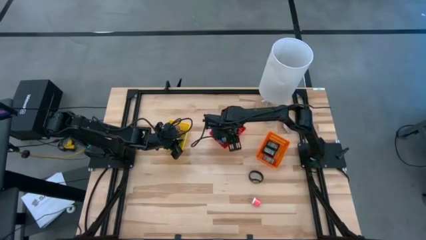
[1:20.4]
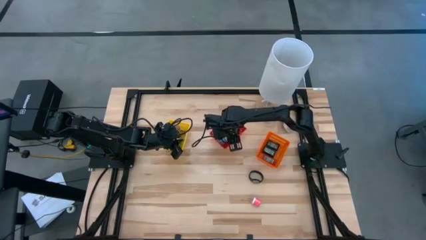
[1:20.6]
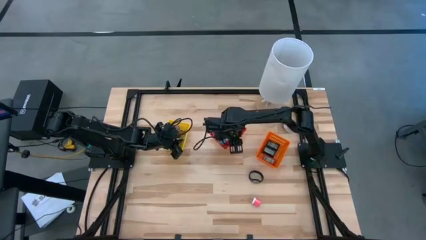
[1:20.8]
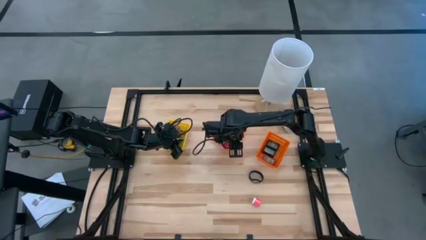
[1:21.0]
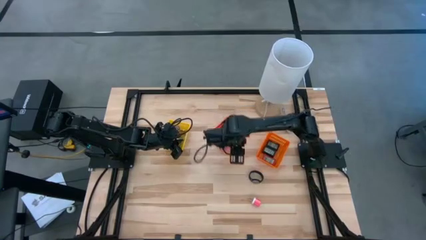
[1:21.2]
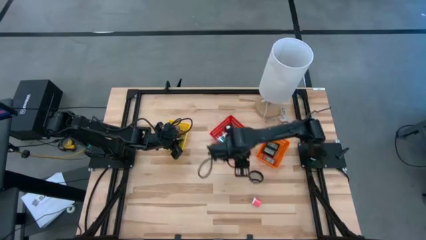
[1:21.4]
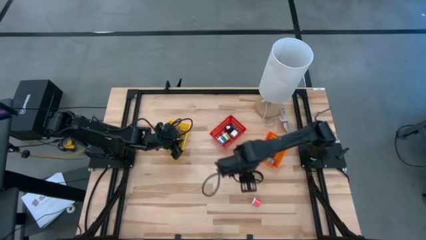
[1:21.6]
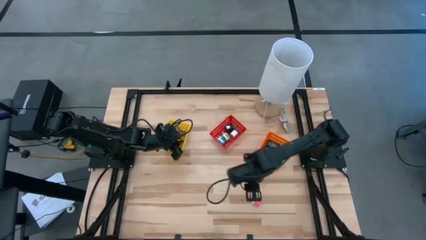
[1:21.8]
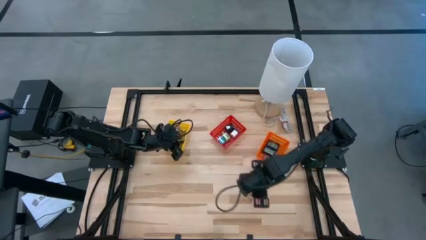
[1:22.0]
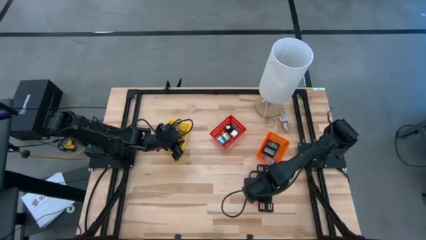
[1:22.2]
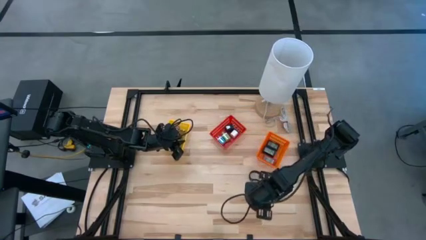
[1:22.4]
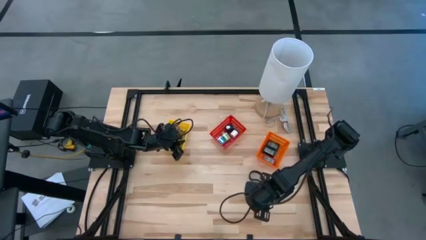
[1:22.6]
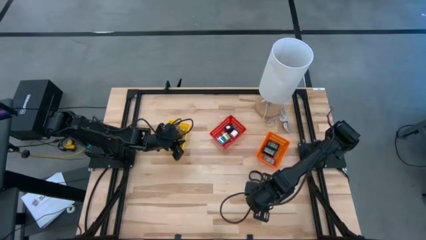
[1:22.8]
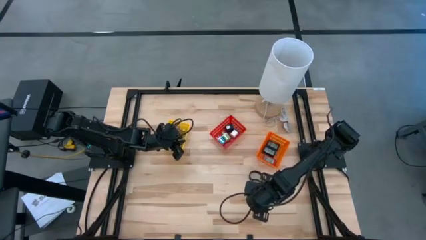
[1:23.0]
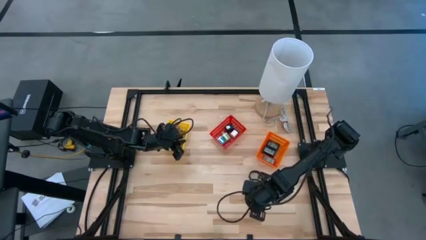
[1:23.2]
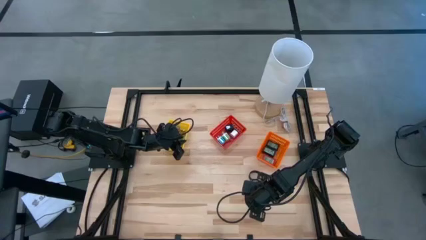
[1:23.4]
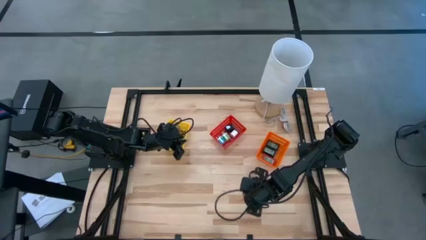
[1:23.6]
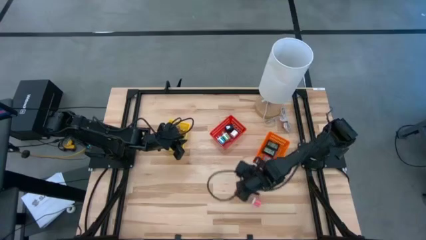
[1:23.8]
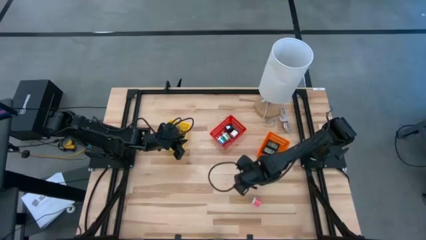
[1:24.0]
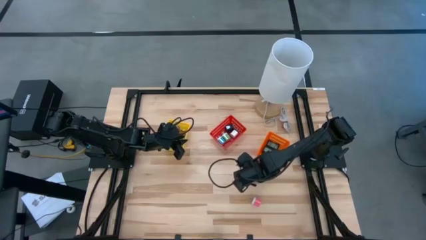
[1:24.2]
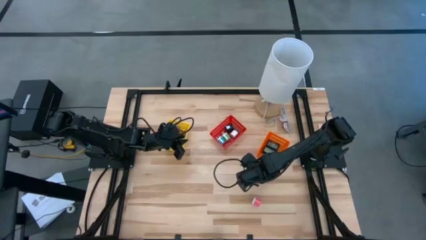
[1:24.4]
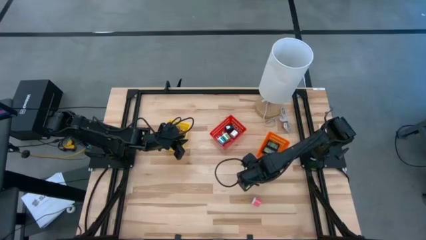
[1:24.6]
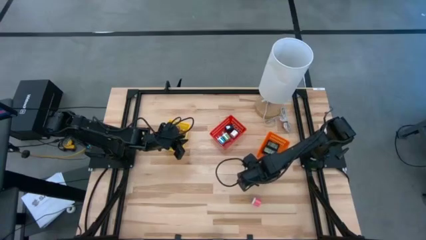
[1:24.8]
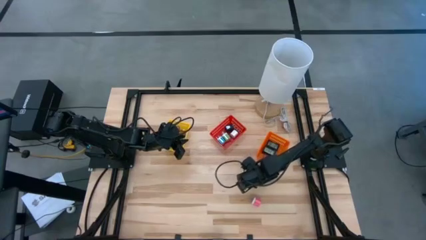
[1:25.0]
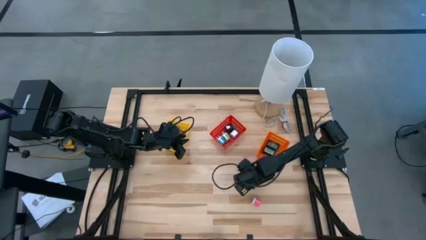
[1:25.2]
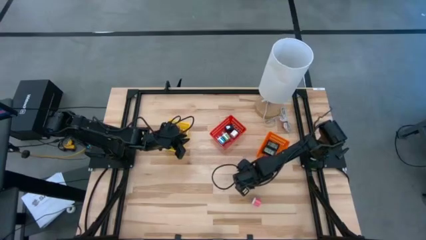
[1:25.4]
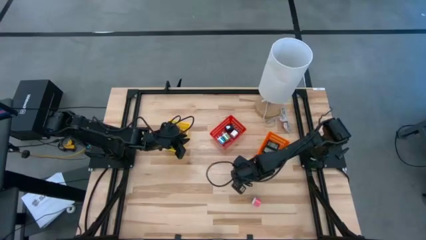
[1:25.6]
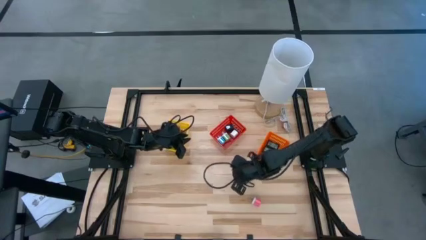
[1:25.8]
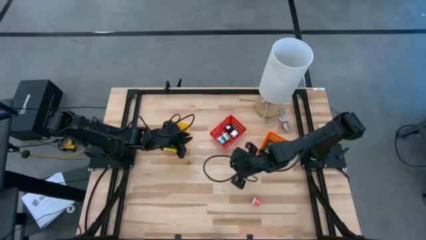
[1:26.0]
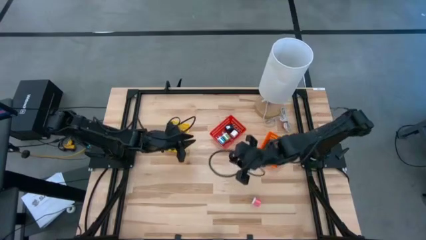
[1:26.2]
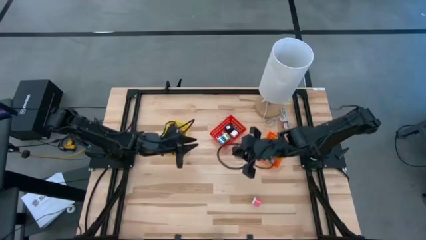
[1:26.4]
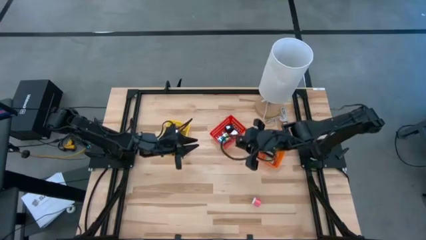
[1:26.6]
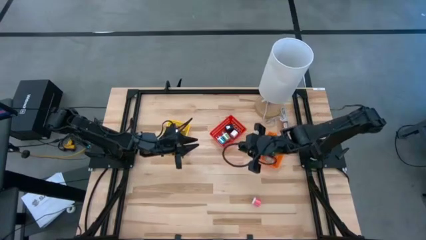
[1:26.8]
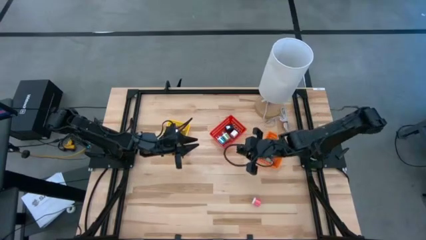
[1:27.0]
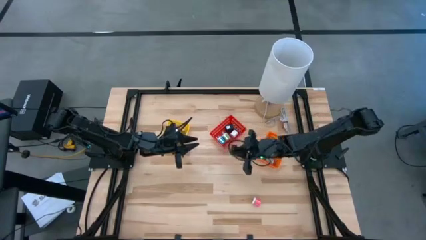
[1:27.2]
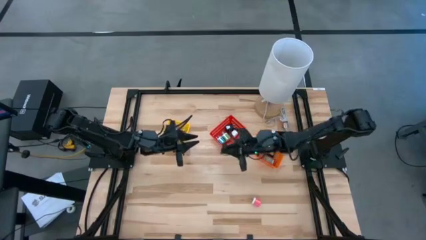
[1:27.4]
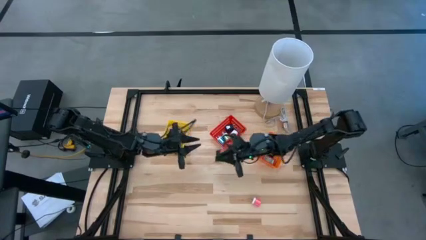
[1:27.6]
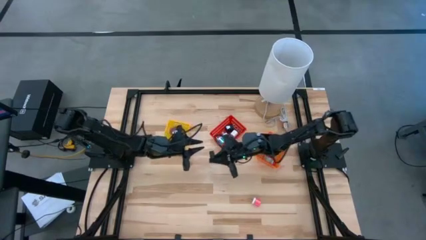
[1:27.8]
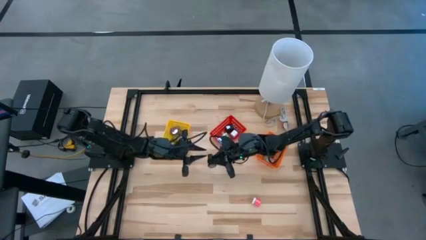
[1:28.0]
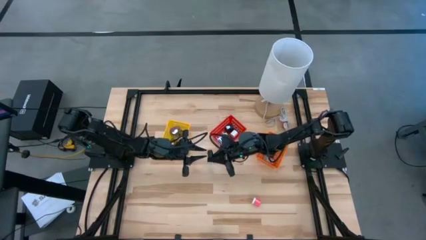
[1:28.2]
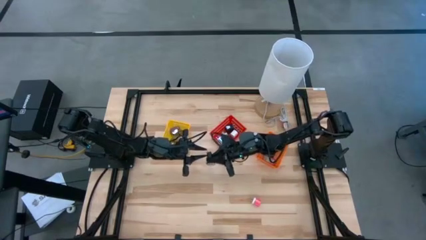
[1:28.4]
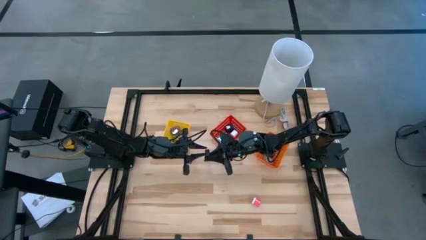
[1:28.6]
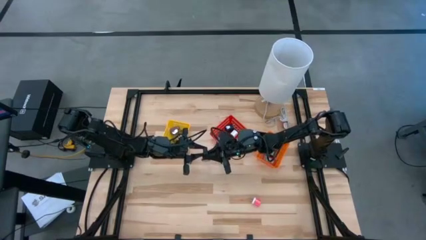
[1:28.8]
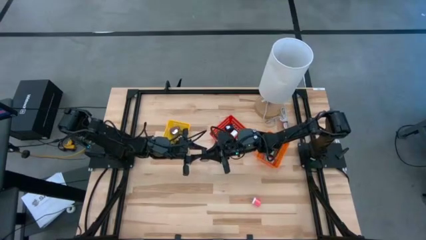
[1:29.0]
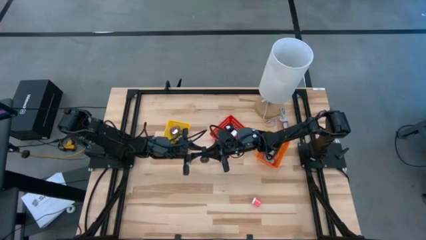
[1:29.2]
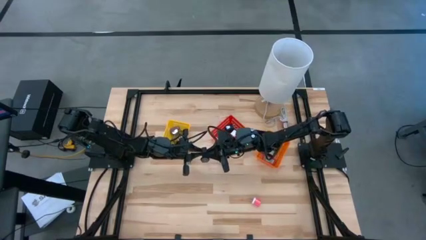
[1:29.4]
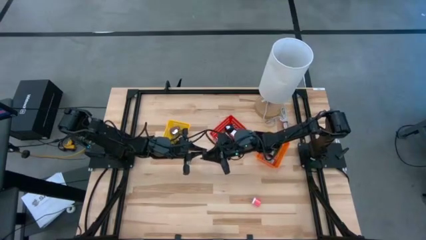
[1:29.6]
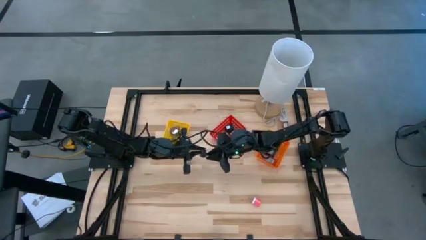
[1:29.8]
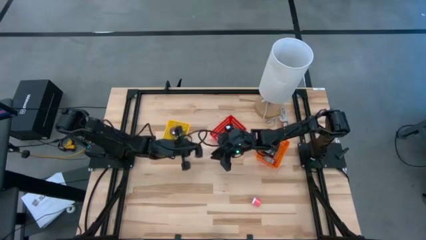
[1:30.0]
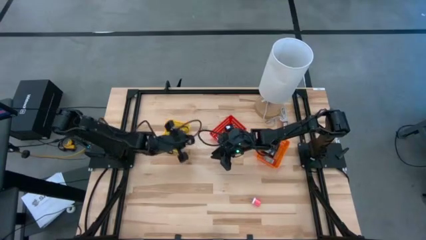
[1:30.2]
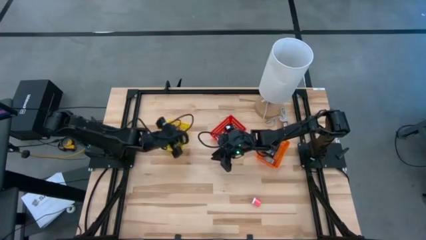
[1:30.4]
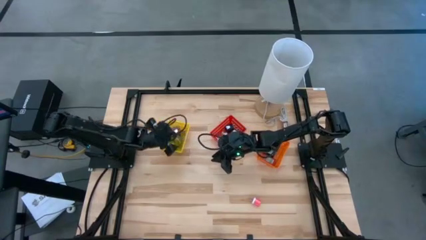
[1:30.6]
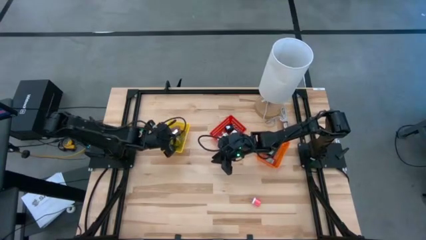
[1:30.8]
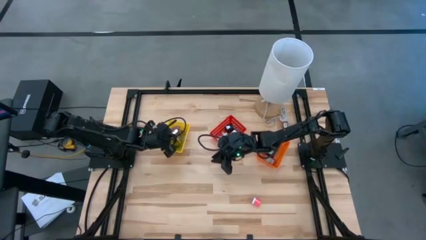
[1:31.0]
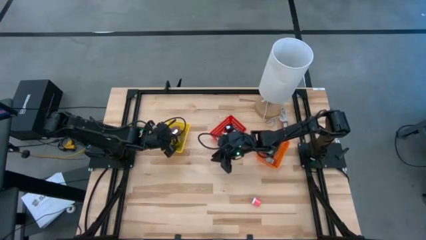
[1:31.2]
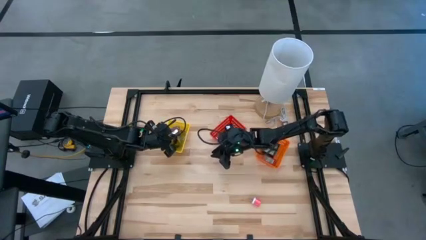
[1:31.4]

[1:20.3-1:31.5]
Task: Pick & Place Office items
Put the black watch into the yellow bin

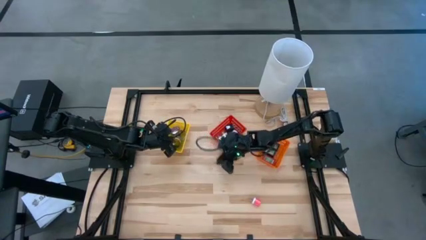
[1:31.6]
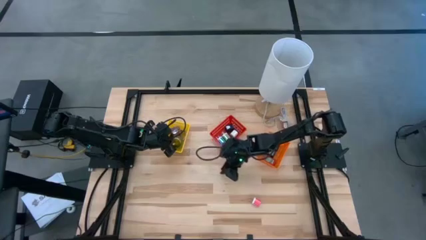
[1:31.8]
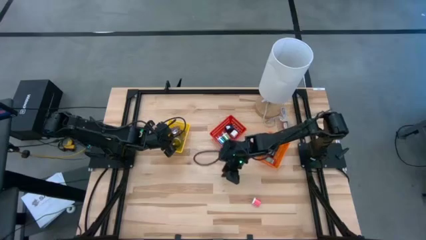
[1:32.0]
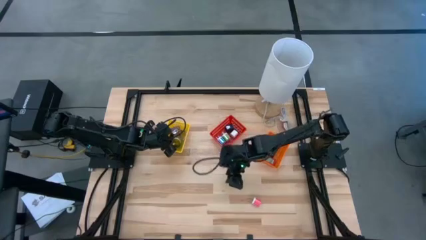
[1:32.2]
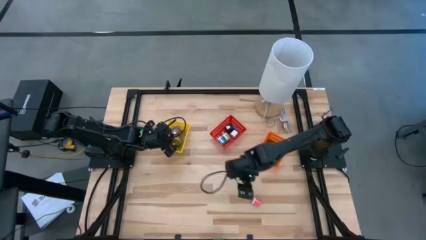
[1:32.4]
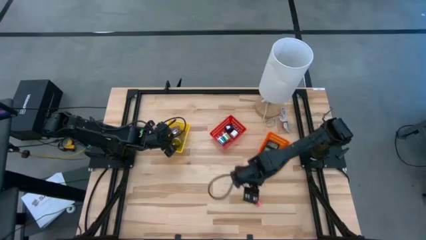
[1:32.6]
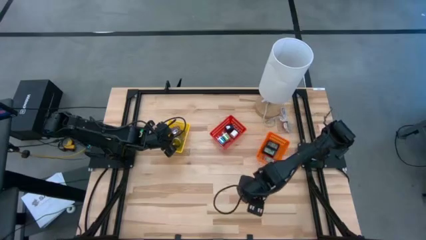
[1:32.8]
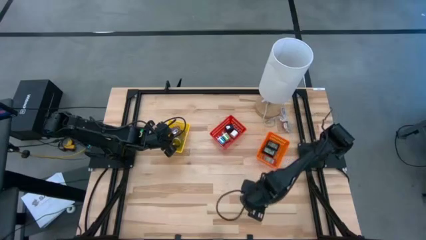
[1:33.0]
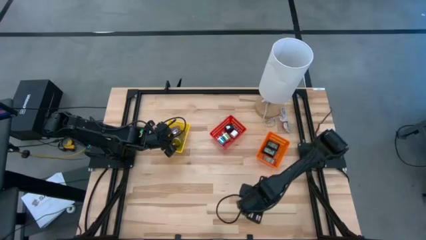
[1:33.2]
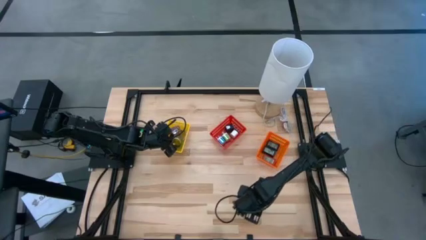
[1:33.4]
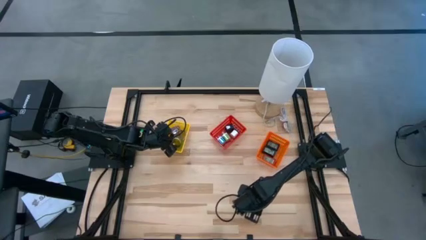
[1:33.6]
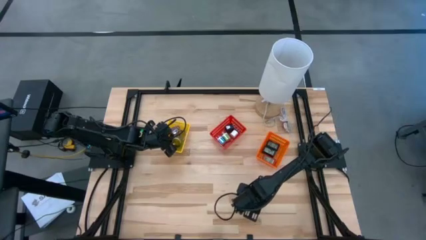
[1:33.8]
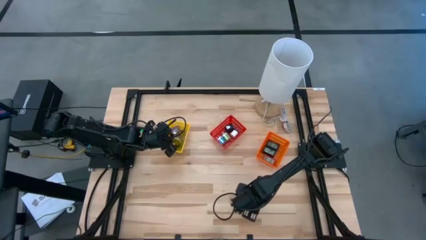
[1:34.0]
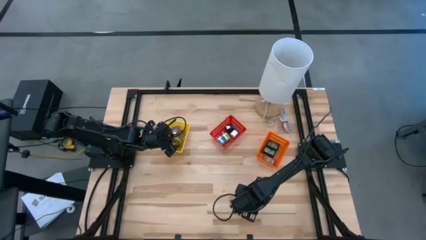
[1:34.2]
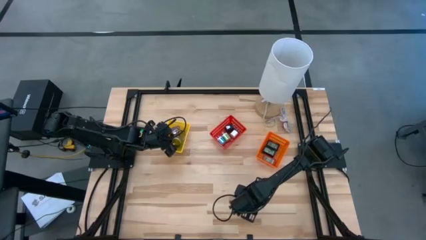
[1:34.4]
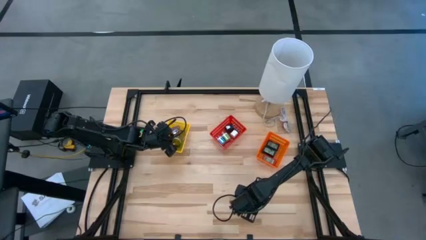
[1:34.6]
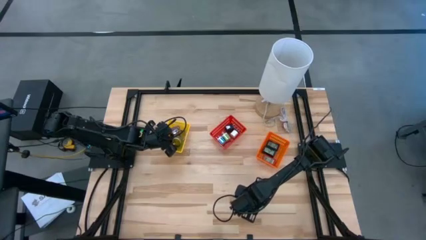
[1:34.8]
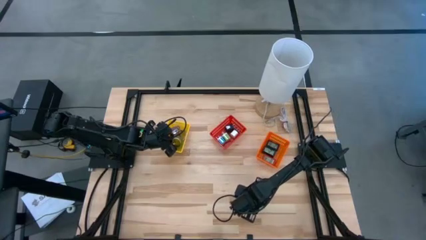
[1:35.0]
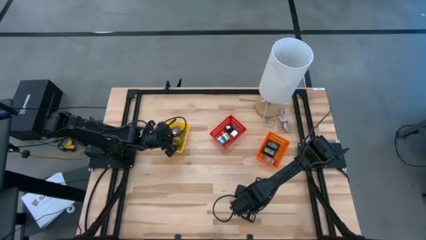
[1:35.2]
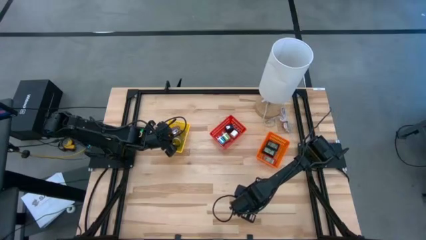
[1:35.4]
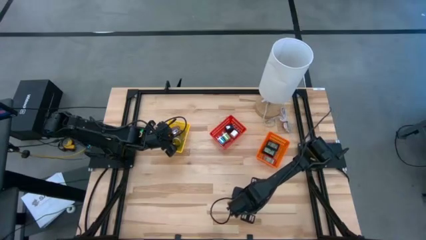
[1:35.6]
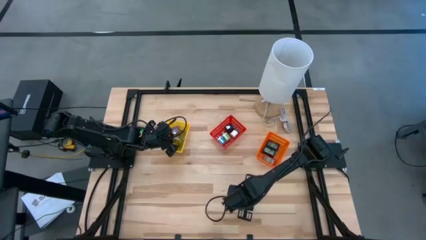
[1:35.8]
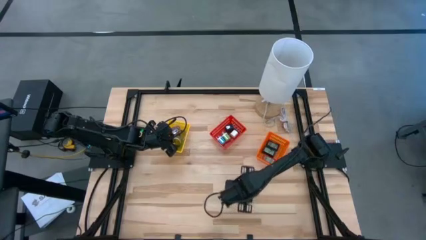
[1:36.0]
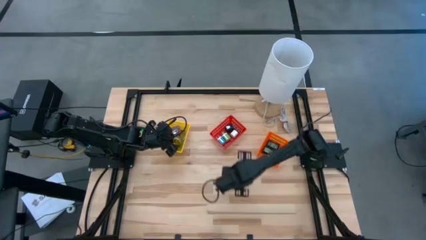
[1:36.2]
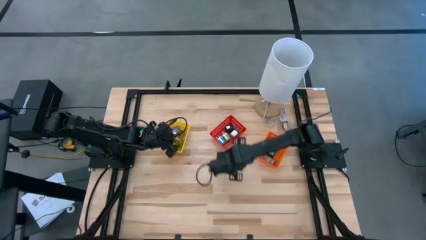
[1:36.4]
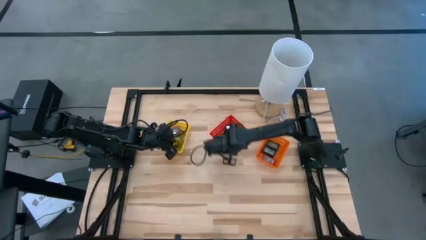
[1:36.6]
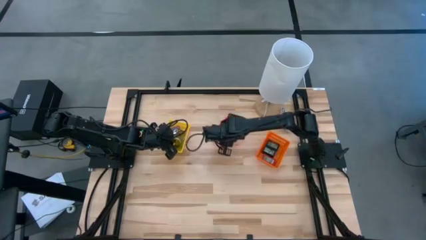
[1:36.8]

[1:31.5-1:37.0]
Put the pink charger adapter into the red bin
